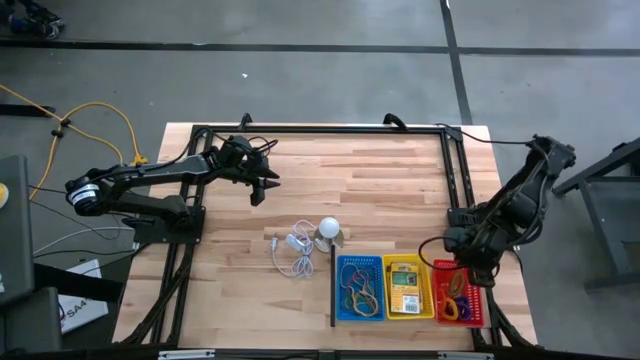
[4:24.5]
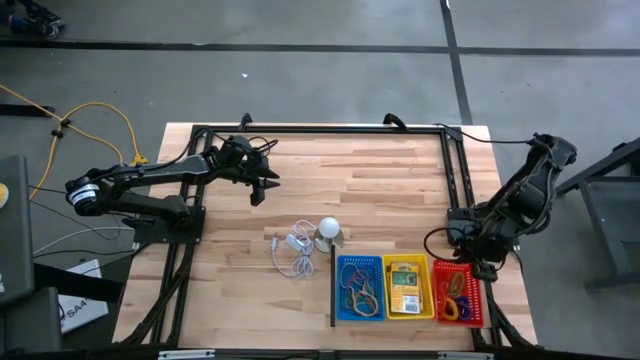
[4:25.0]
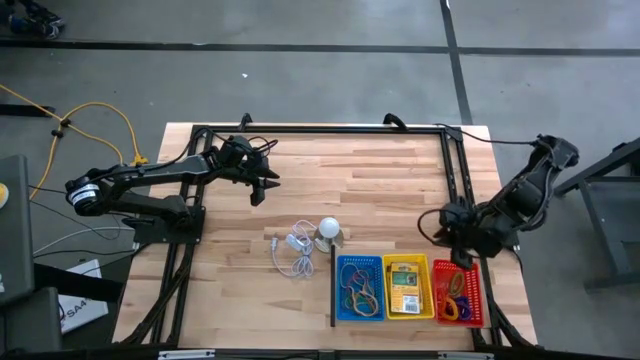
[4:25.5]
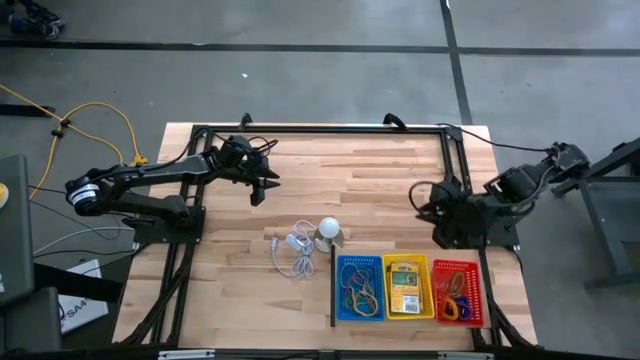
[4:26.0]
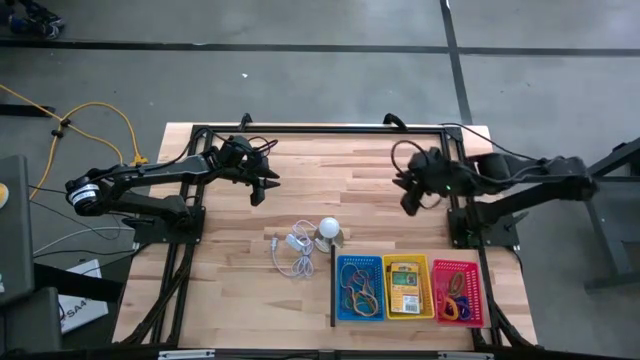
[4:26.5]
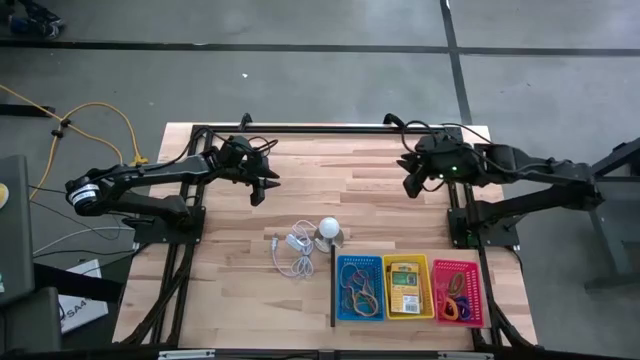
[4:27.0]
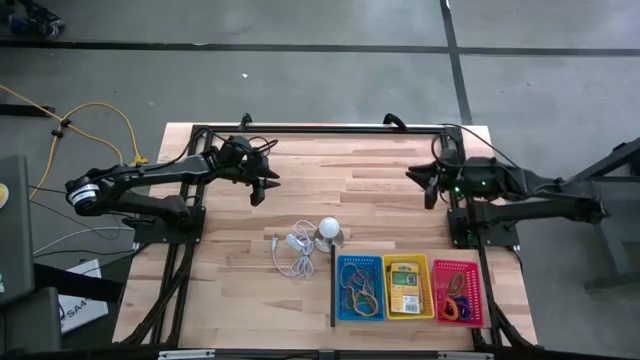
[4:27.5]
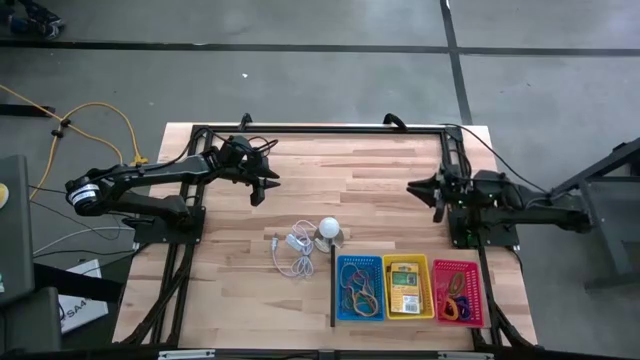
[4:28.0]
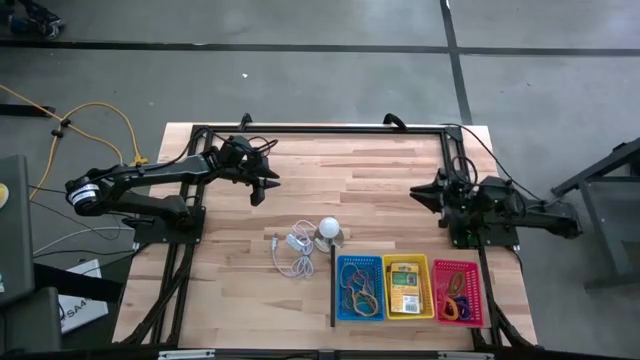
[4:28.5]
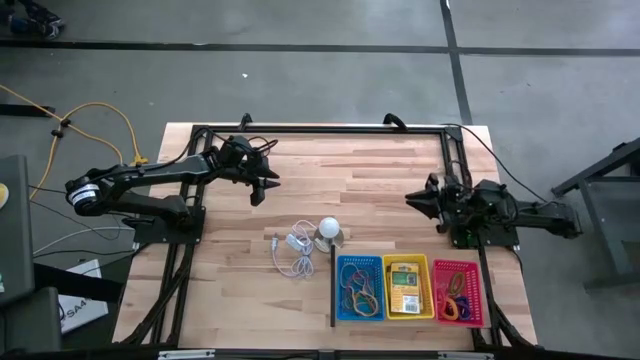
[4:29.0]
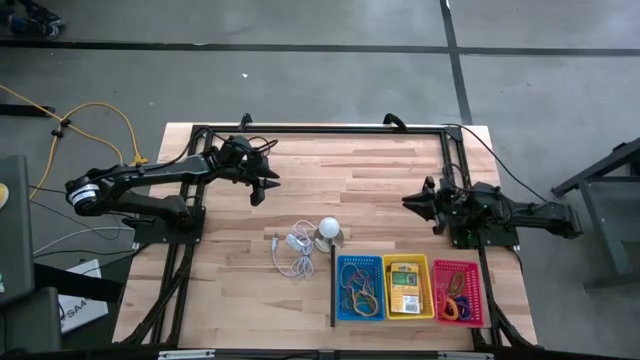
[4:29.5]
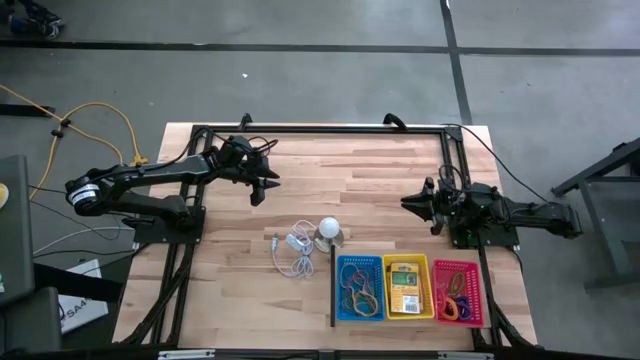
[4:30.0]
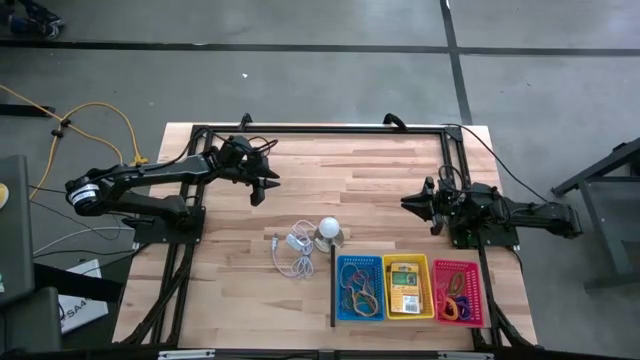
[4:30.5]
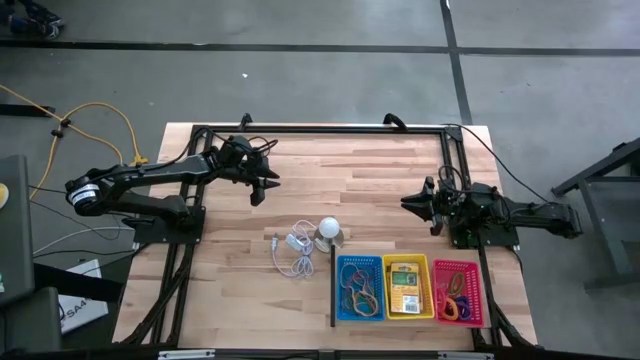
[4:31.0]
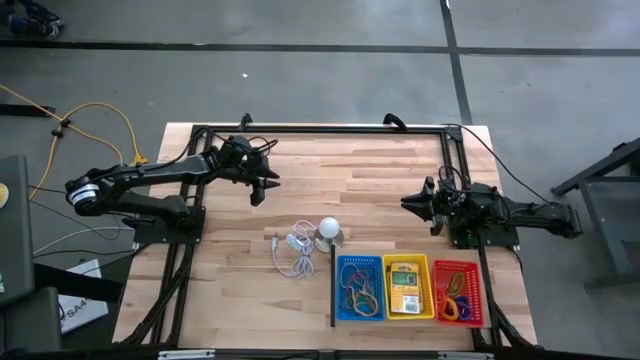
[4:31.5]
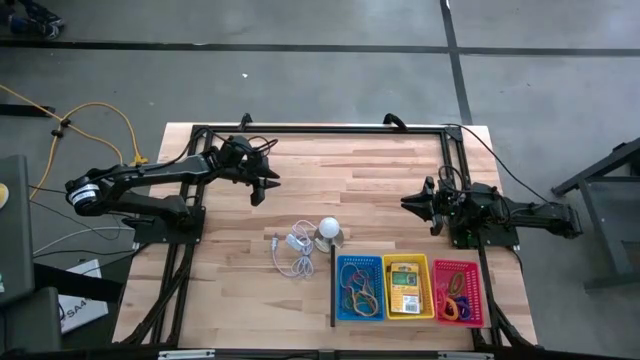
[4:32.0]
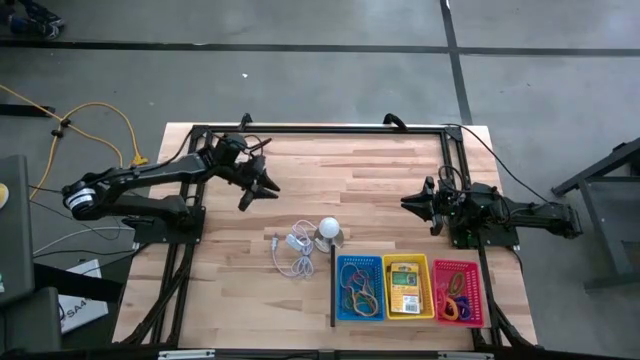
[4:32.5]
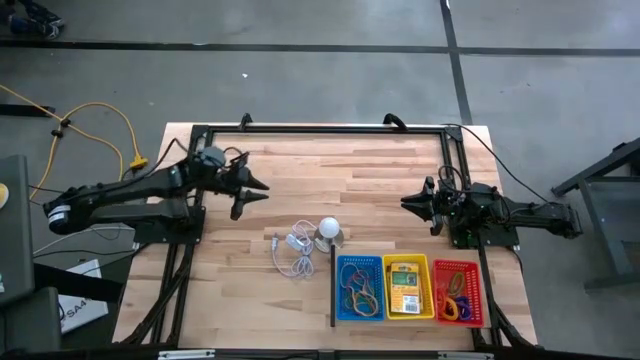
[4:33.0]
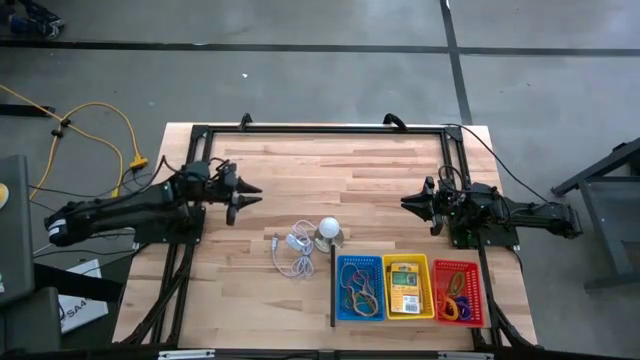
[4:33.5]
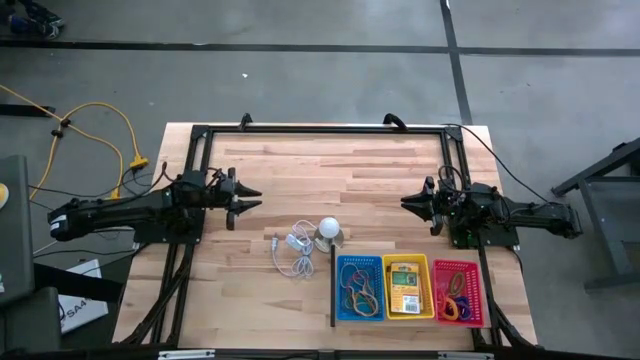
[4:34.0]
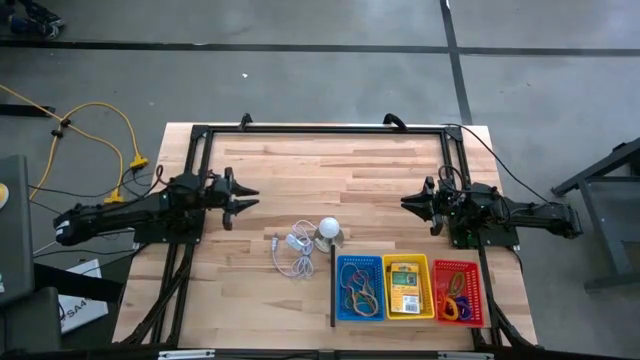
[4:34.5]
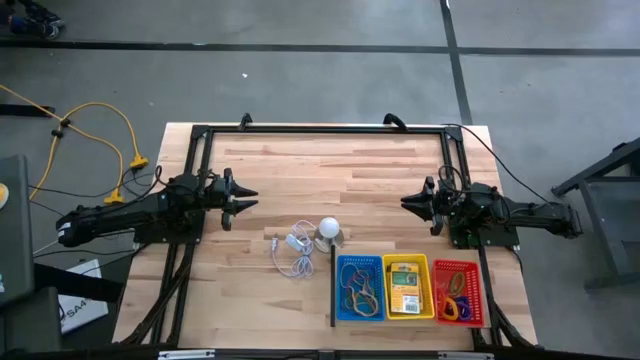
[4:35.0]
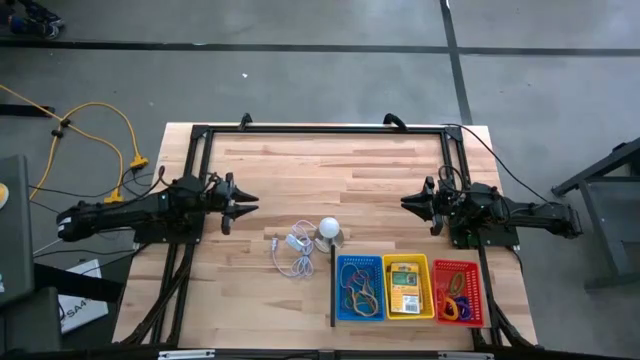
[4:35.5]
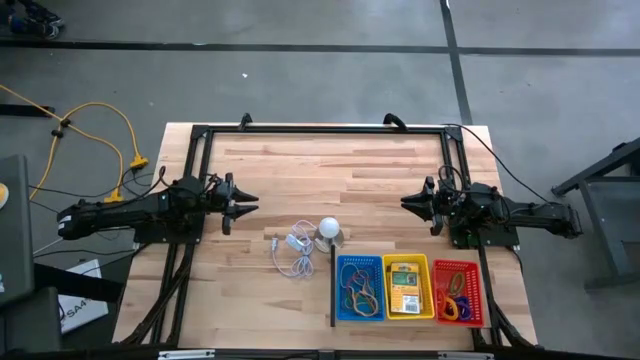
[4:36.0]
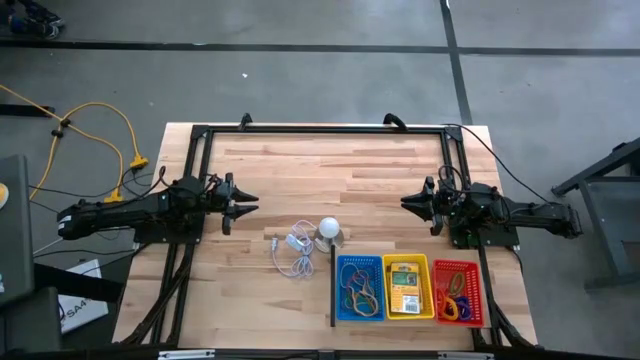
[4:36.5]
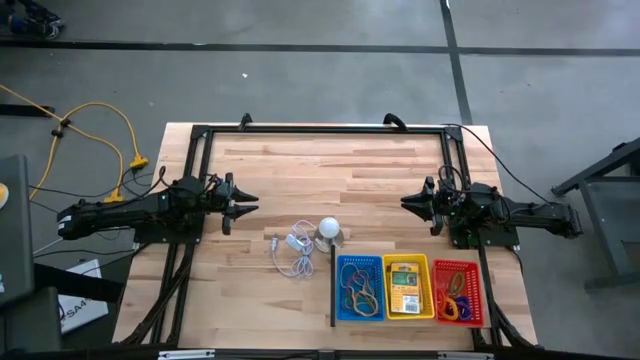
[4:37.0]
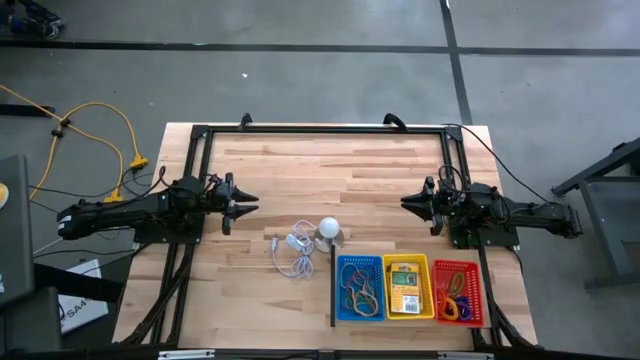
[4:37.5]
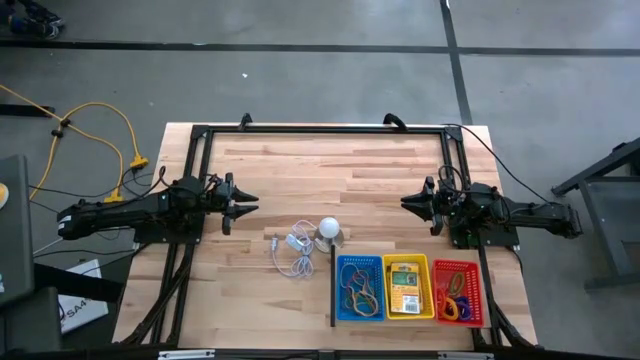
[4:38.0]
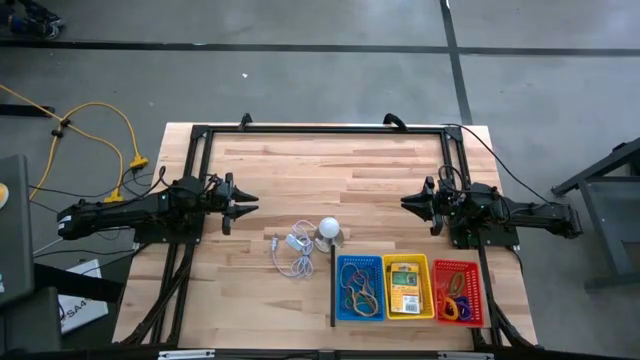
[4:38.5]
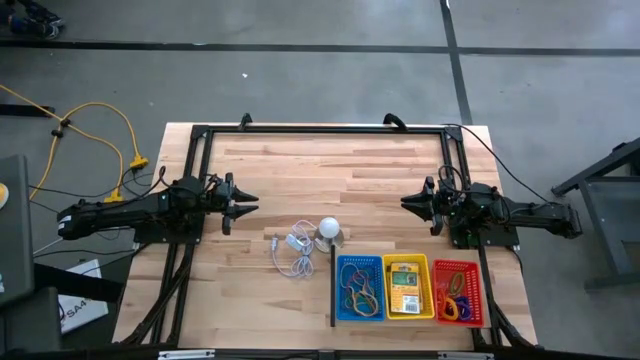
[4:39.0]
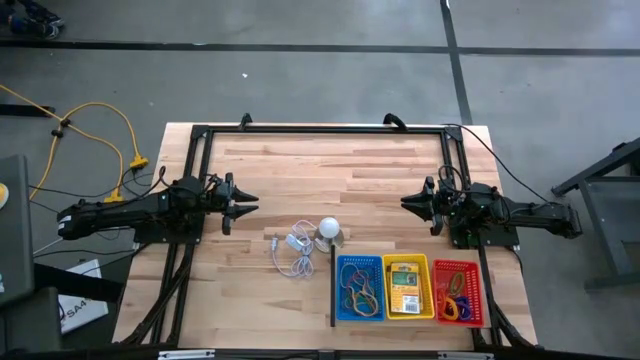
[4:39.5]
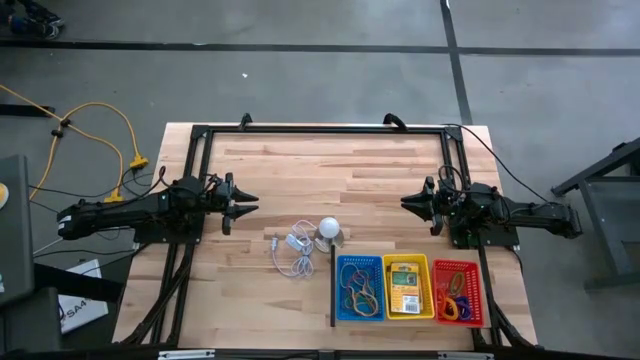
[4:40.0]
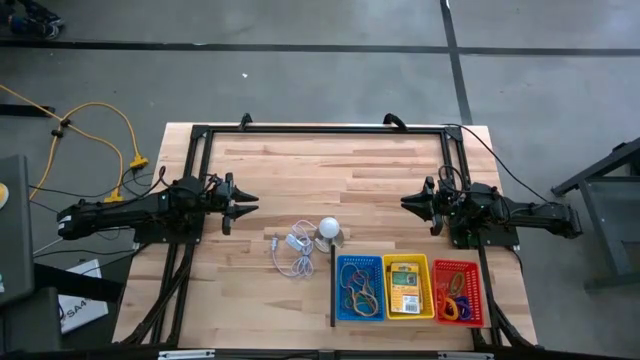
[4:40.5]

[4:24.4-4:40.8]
Task: Pick & Place Office Desk Supplies
Return to Home Position

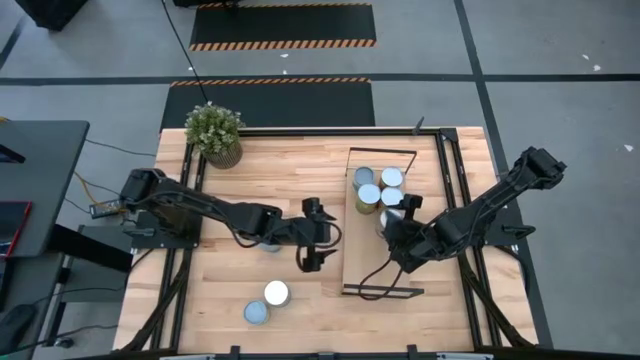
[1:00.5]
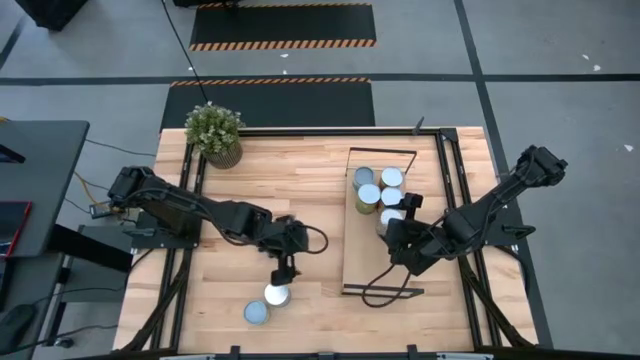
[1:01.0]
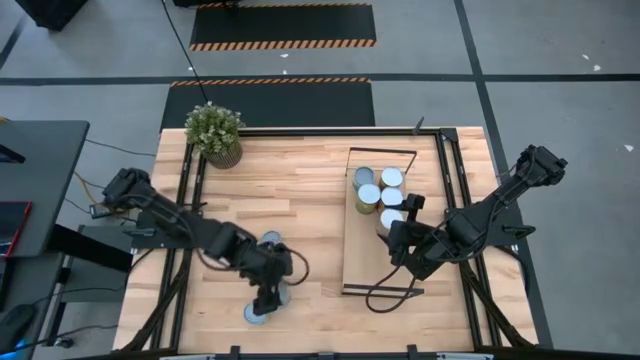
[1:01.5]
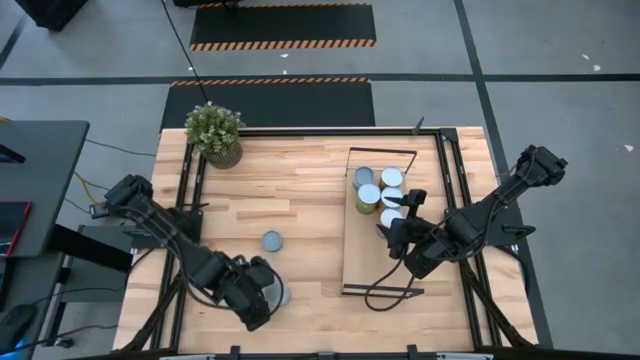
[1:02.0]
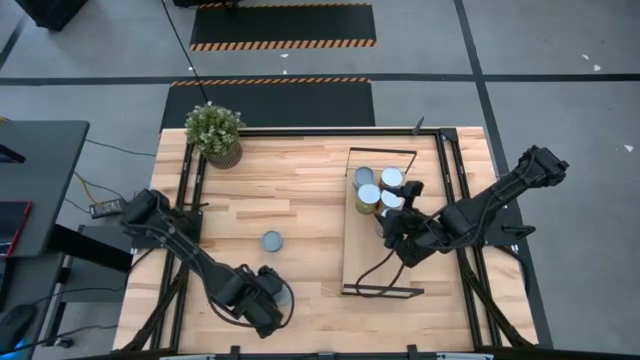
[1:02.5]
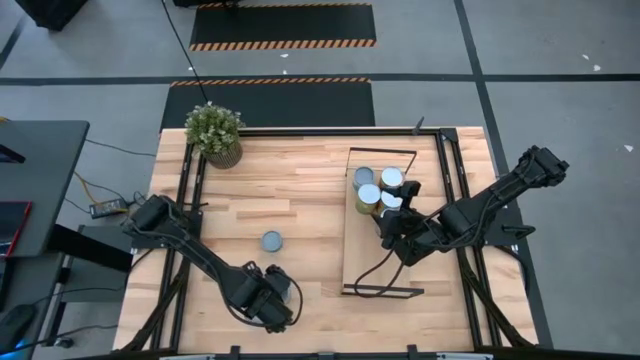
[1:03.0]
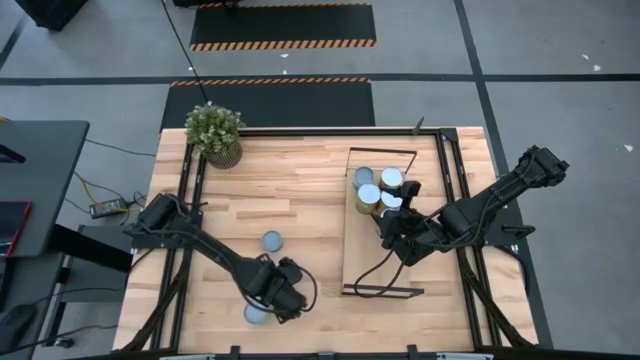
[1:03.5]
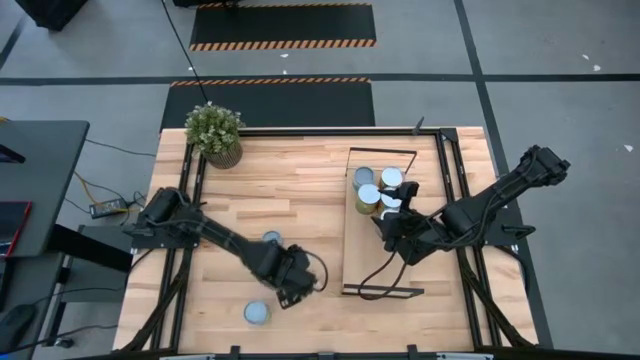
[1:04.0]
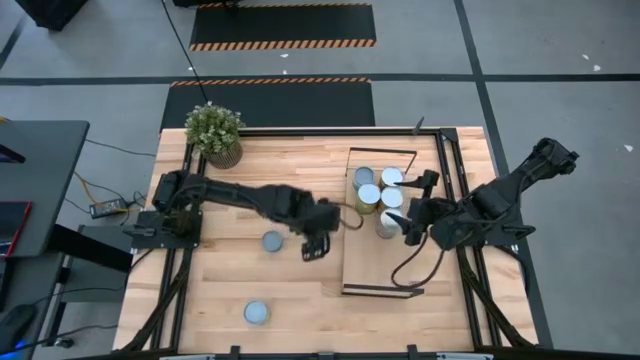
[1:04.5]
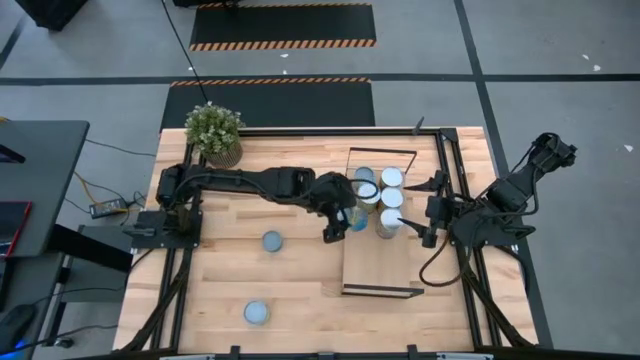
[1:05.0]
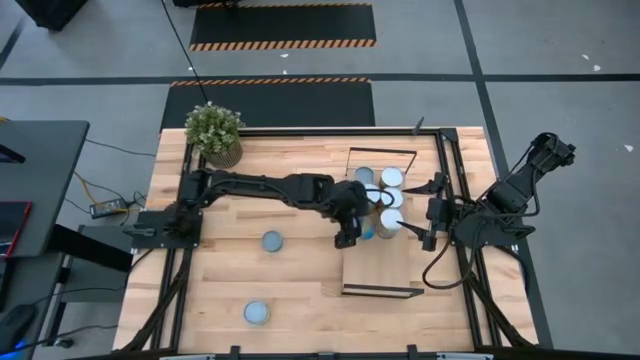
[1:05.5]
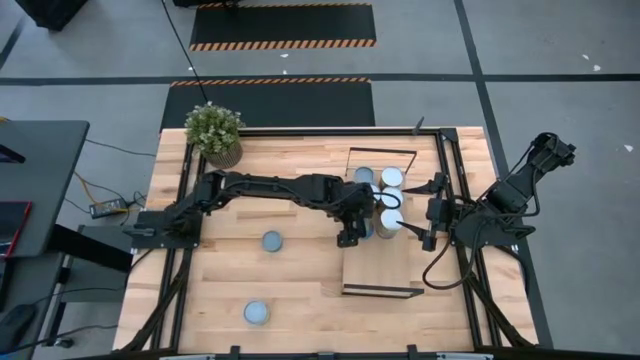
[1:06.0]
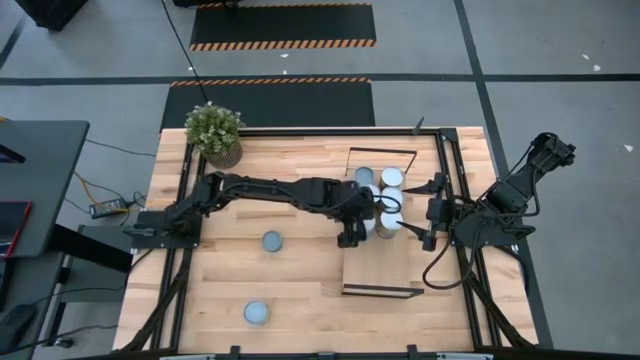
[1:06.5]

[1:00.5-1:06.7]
Task: Pick and place cans onto a shelf
Put the canned cherries on the shelf
